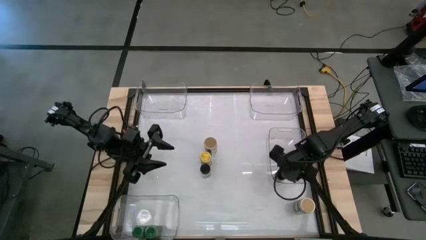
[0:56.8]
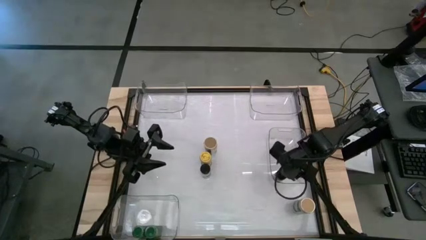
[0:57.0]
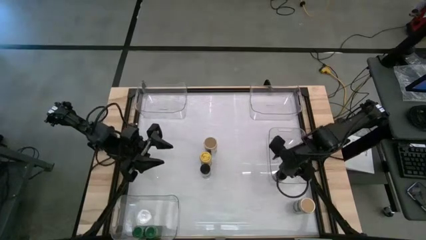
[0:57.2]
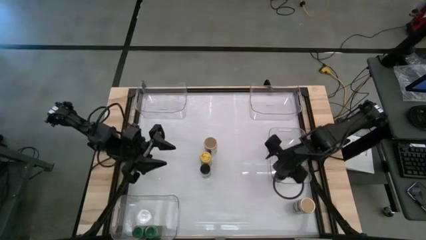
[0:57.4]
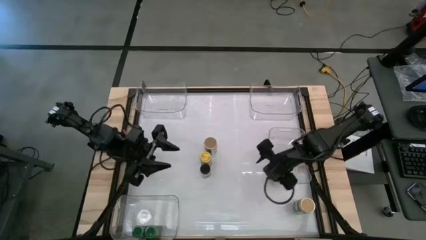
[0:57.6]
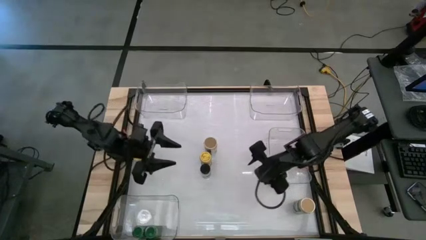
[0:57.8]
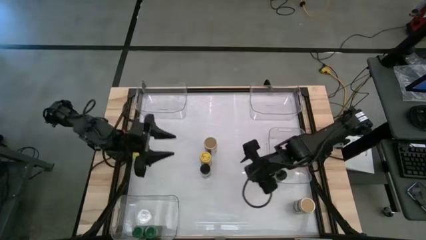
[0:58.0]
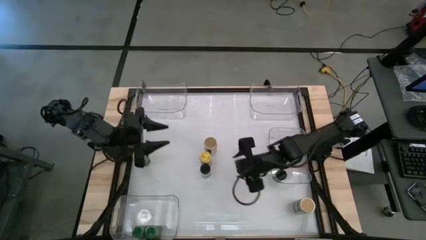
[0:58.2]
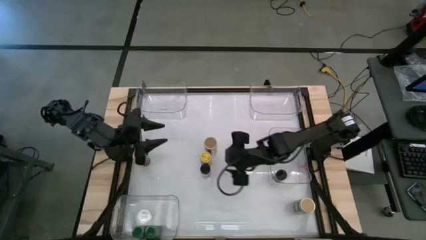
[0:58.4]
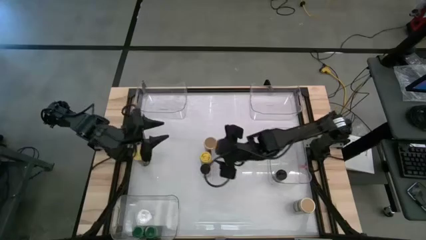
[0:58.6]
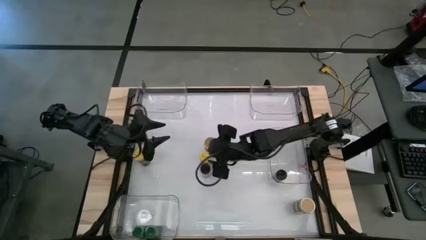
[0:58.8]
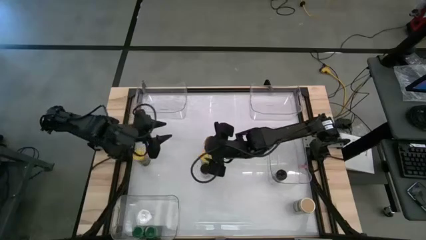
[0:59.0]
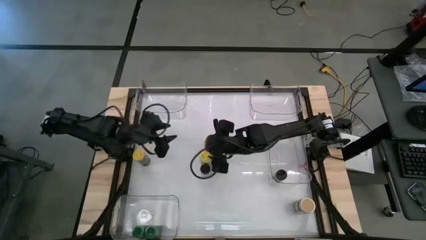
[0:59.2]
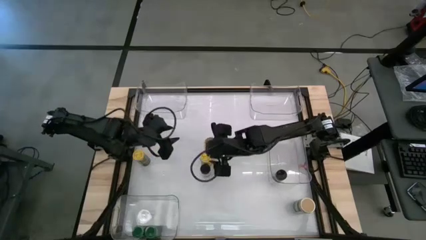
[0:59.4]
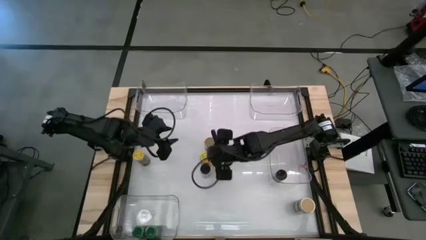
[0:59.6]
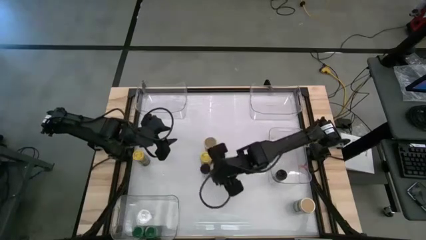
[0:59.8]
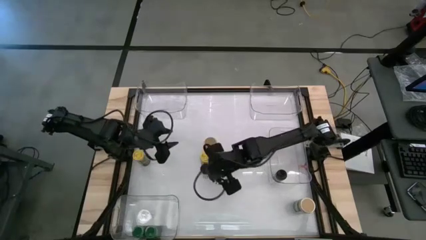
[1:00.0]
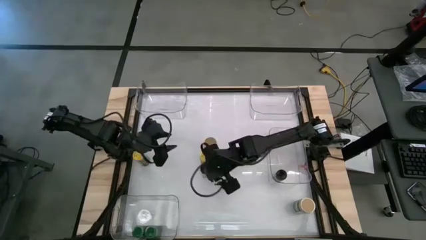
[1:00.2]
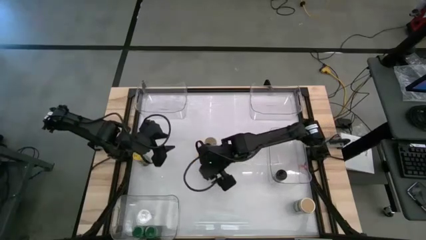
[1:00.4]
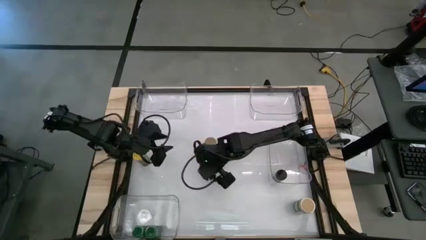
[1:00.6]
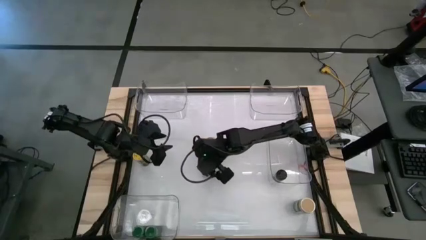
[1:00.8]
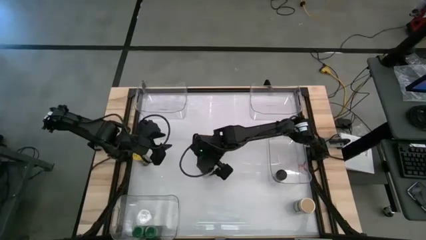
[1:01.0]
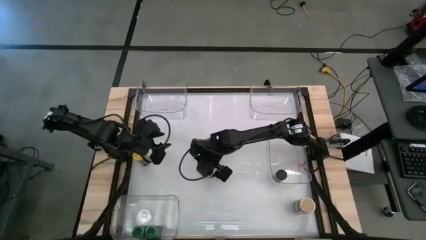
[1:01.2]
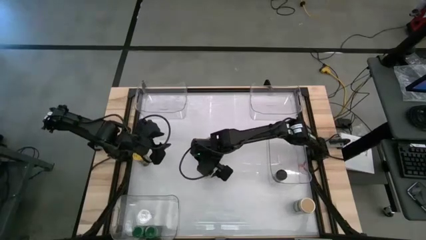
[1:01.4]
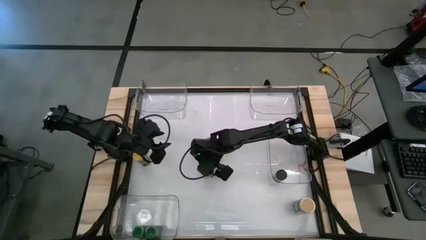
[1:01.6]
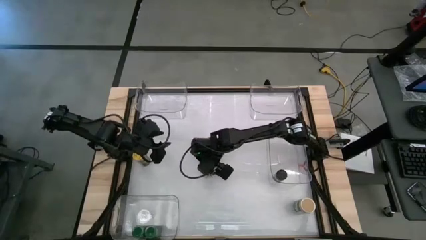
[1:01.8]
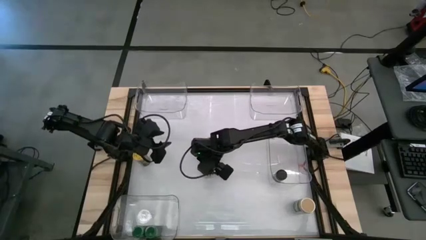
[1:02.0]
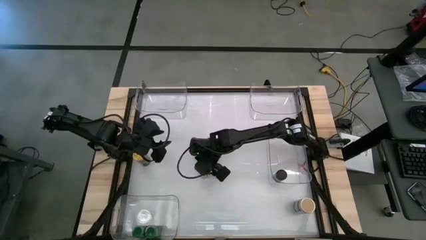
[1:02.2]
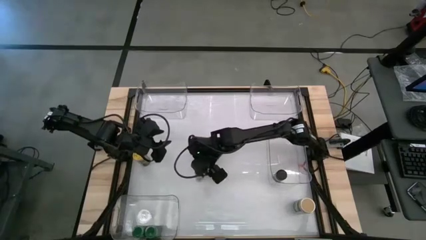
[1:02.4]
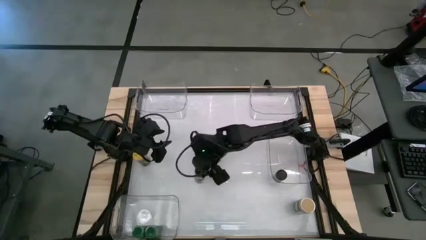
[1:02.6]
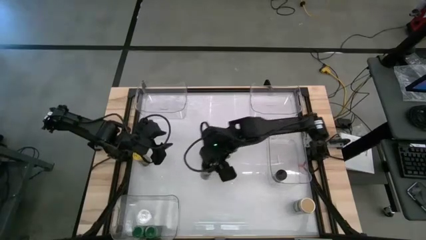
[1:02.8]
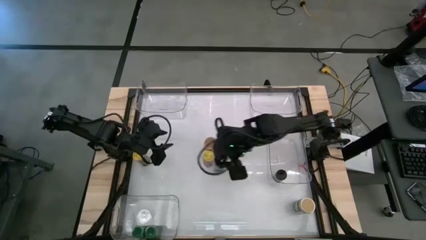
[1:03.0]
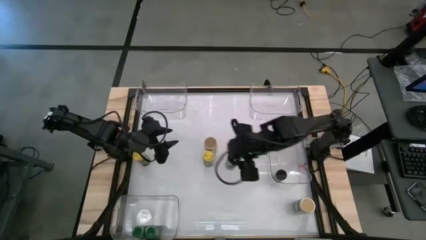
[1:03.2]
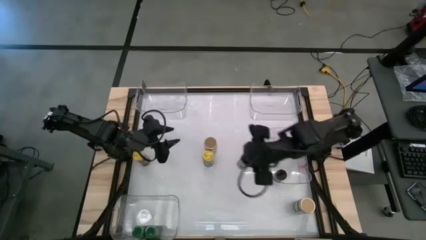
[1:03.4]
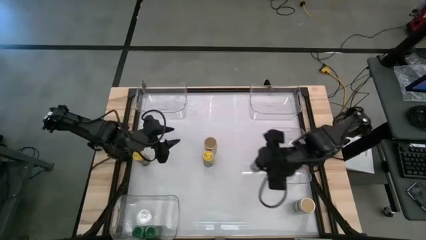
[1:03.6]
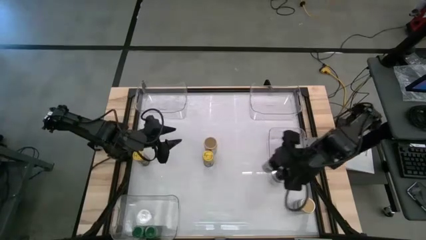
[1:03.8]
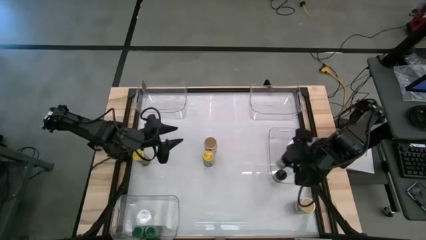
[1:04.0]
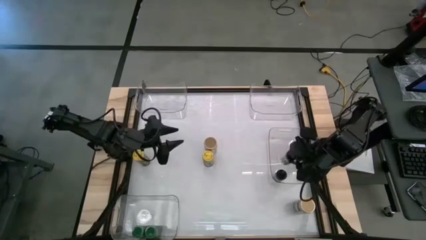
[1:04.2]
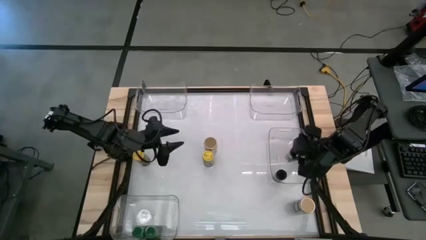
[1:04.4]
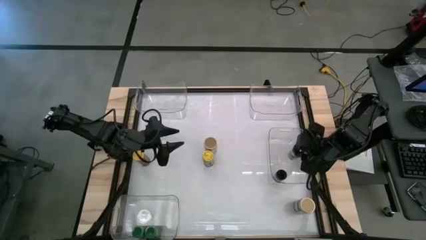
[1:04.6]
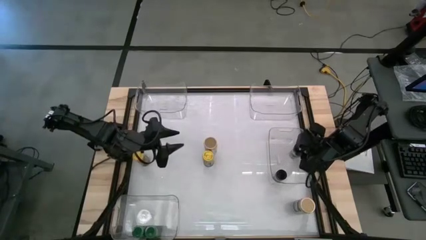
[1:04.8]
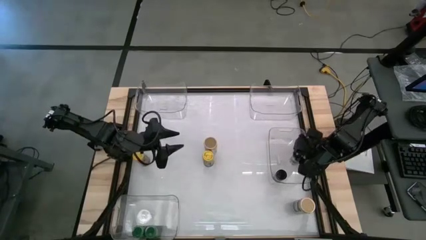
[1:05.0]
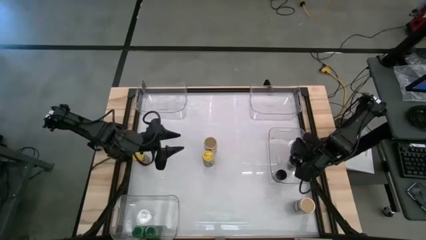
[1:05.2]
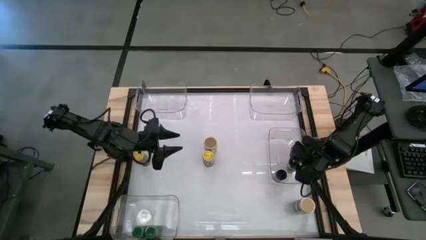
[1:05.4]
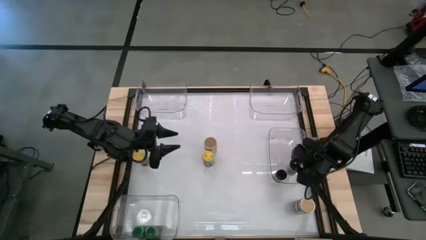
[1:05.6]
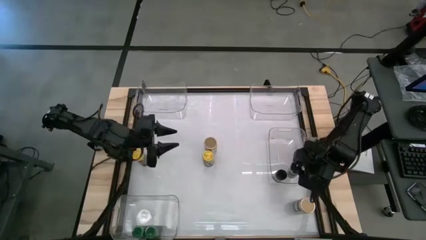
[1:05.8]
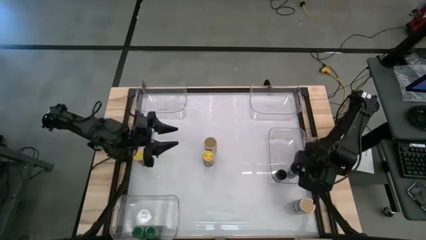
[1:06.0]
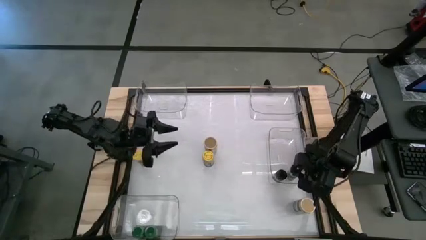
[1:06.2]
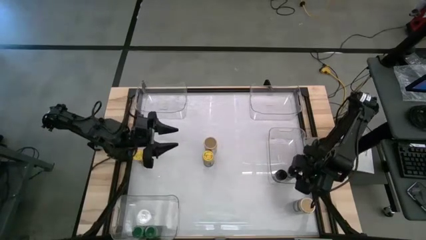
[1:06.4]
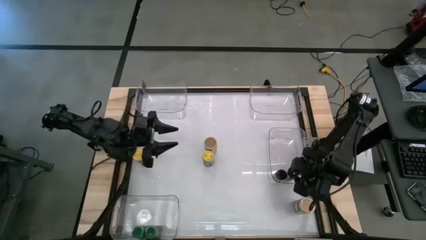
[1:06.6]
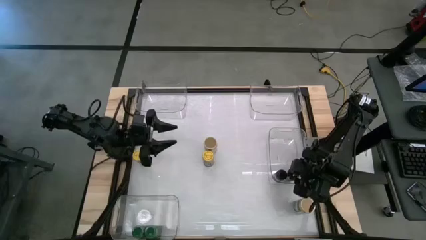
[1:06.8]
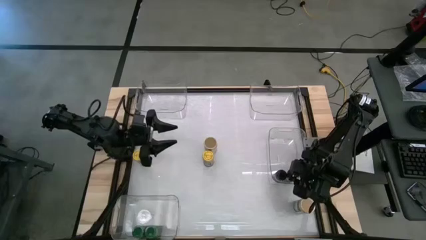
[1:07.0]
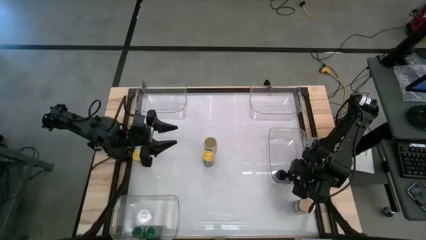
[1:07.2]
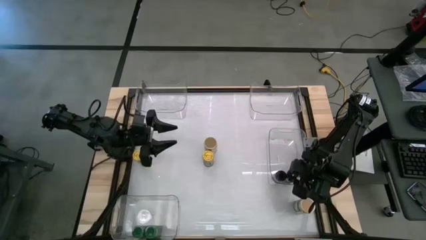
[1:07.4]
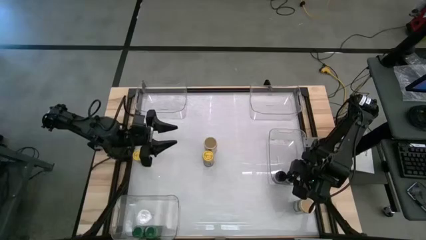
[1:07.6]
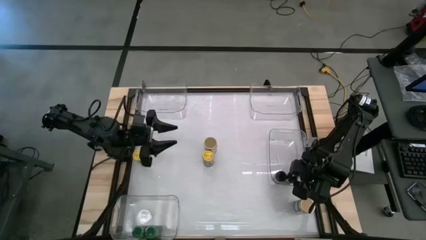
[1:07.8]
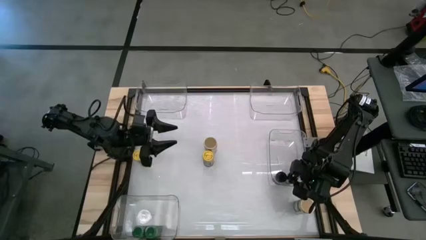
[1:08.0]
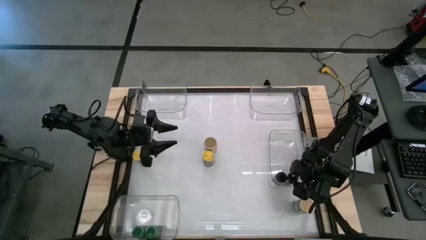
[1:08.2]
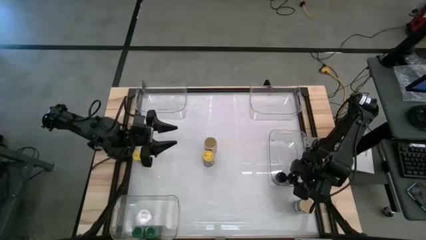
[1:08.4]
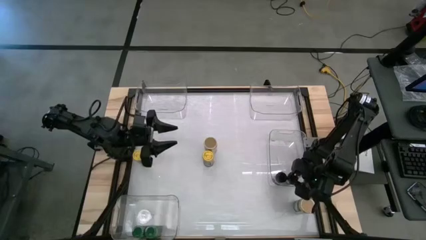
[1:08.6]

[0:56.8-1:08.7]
Task: Sort spices by type
Put the black seasoning bottle into the middle transparent bin

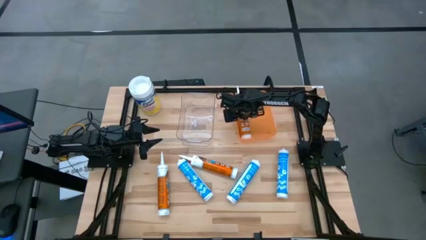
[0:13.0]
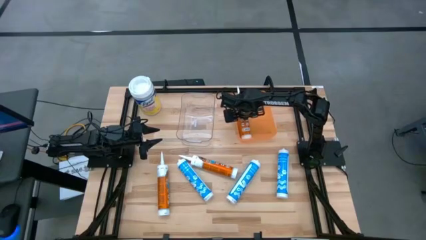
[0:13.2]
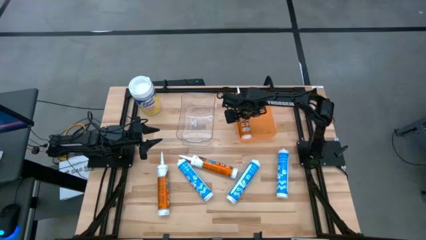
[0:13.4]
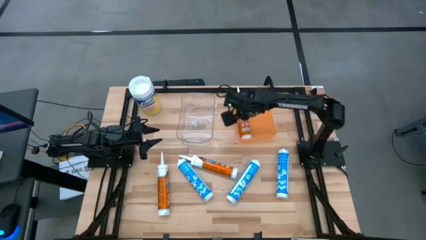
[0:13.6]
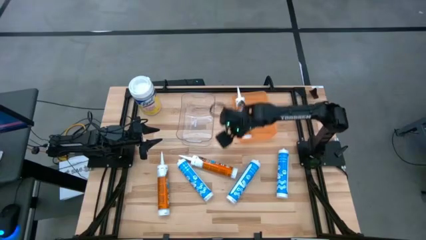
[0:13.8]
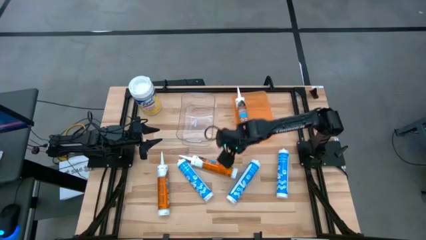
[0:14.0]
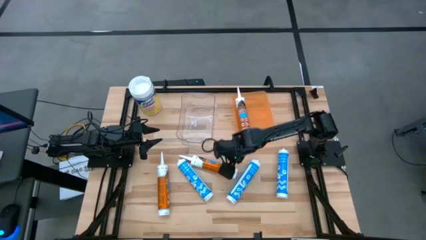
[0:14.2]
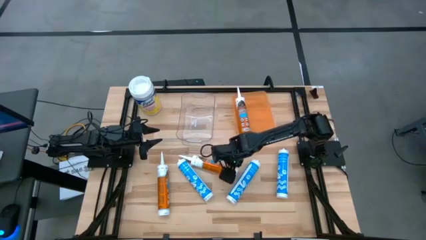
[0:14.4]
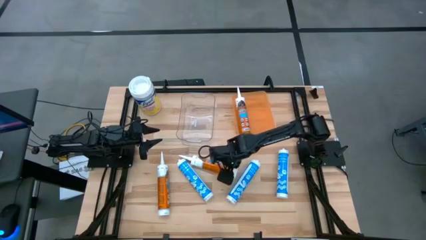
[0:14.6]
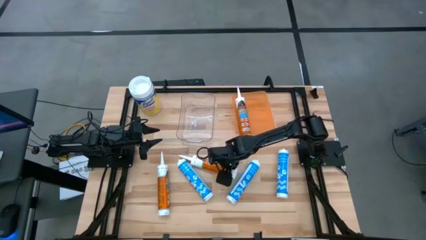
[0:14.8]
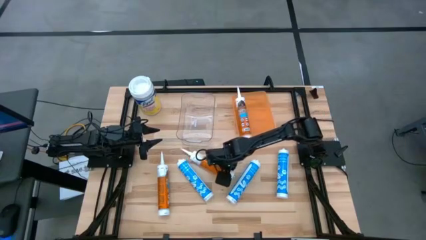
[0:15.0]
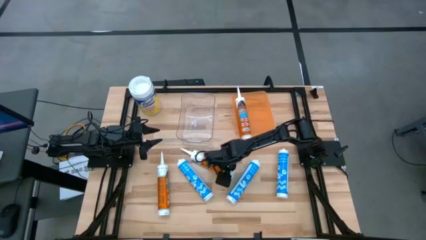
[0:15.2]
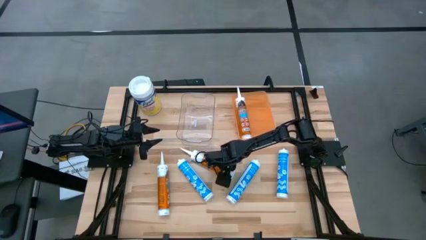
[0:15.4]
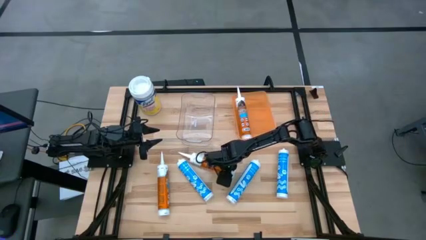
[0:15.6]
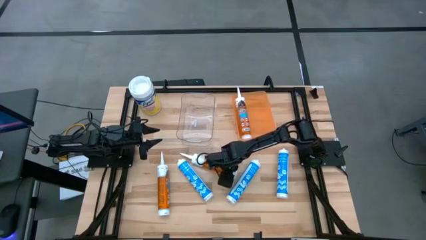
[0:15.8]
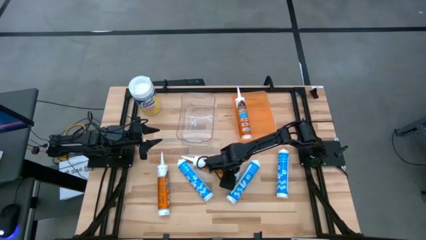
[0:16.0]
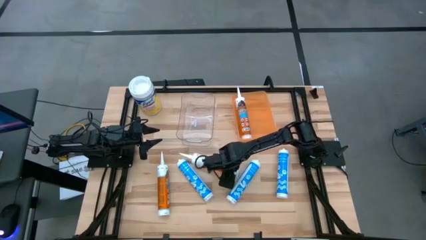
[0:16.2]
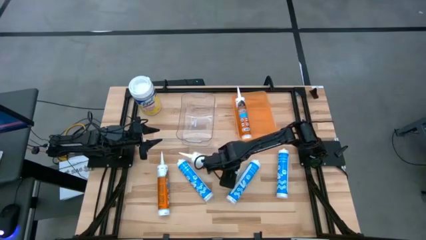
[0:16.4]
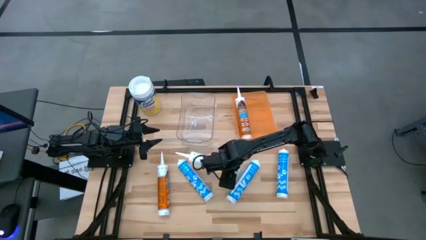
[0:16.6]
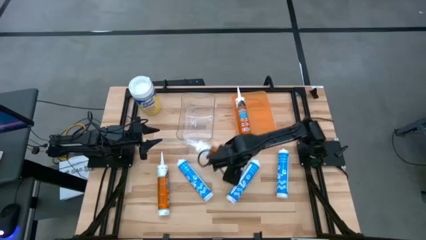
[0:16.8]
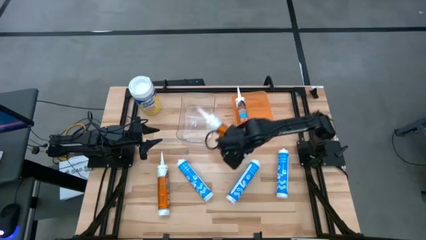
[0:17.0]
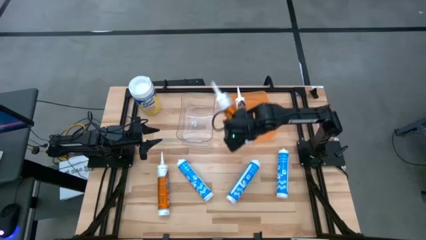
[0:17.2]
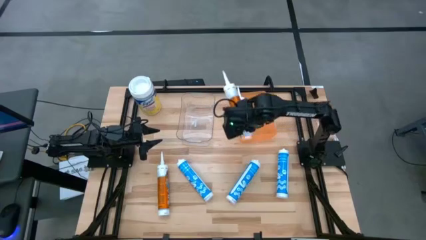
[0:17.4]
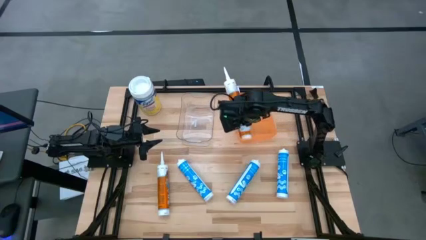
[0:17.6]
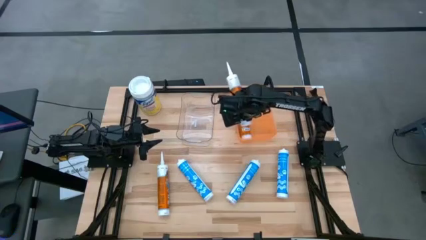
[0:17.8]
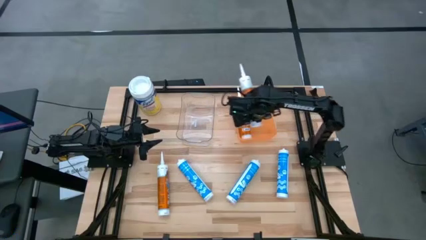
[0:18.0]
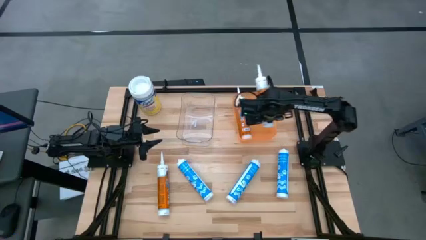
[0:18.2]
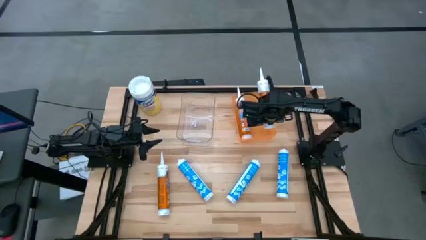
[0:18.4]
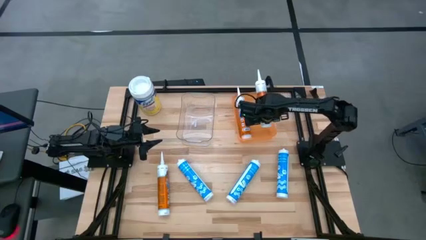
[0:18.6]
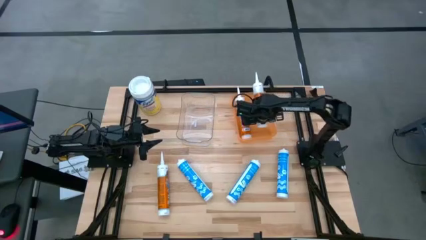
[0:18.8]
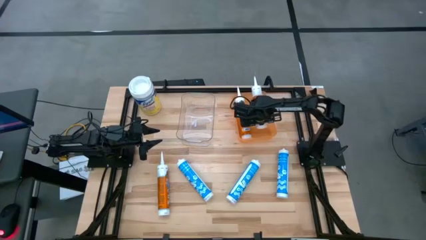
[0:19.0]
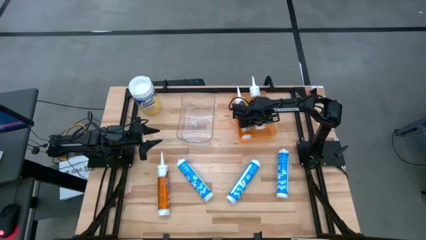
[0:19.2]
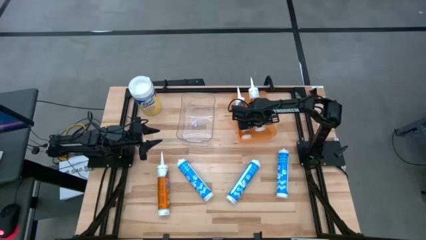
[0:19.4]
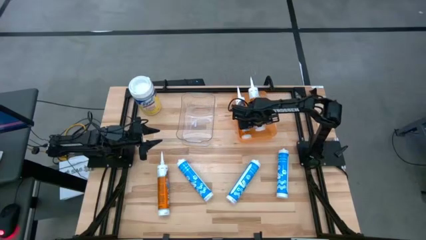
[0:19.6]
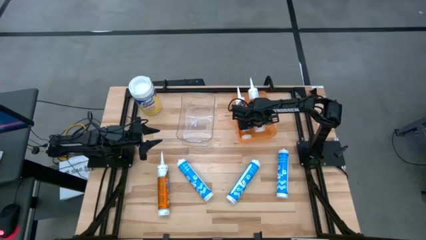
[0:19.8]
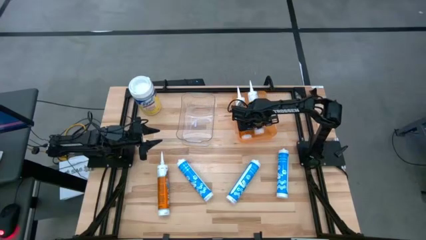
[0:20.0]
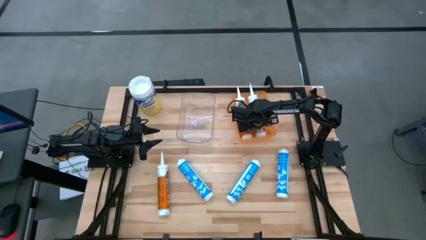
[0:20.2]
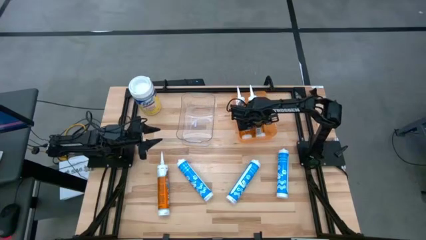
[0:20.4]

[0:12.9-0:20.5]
Task: Pick & place silicon tubes, Sealant and Lysol wipes
Put the orange sealant into the orange bin
